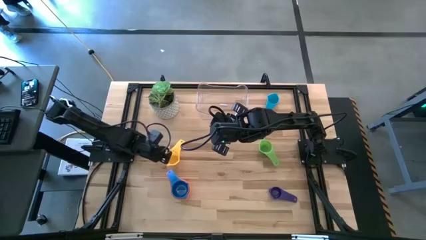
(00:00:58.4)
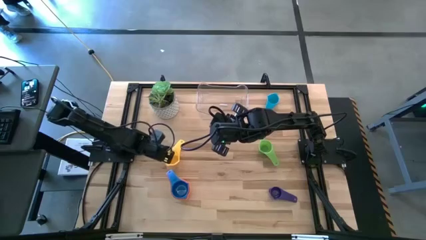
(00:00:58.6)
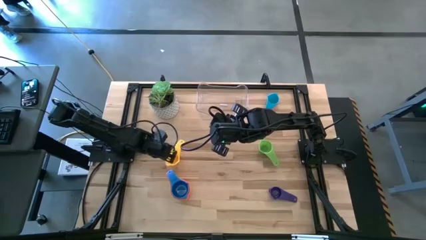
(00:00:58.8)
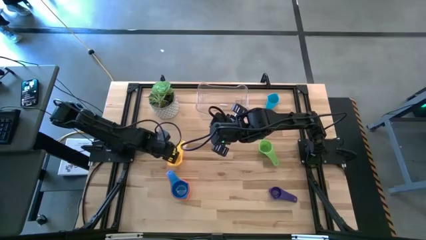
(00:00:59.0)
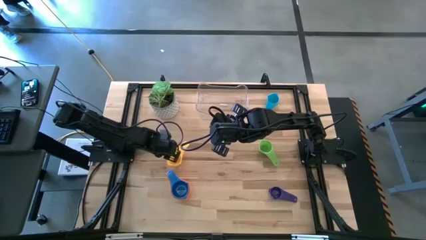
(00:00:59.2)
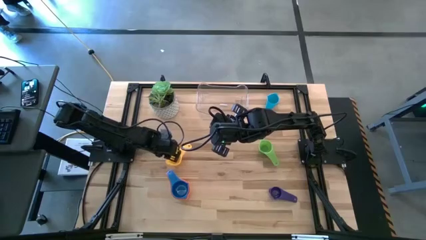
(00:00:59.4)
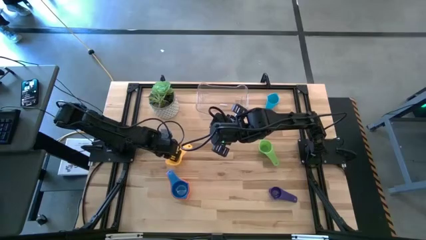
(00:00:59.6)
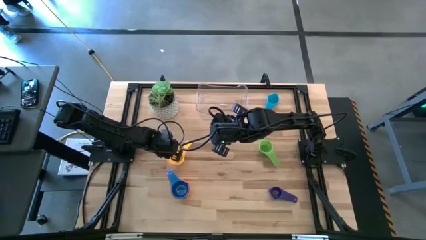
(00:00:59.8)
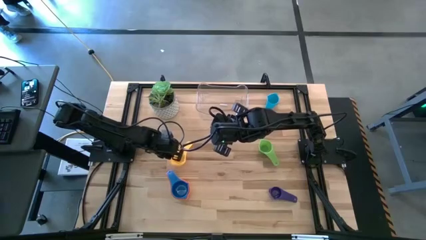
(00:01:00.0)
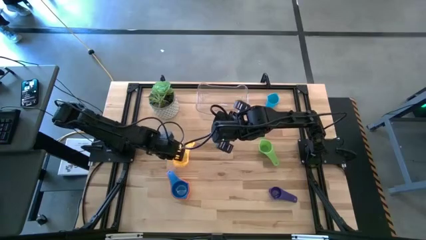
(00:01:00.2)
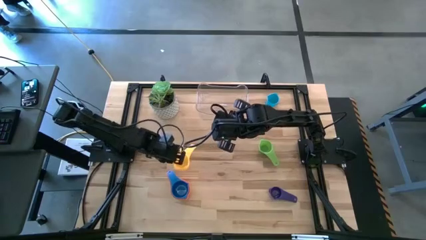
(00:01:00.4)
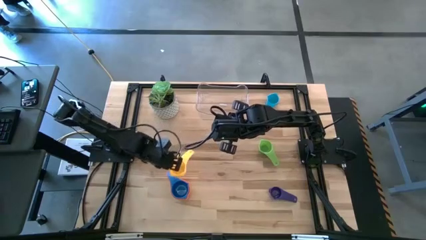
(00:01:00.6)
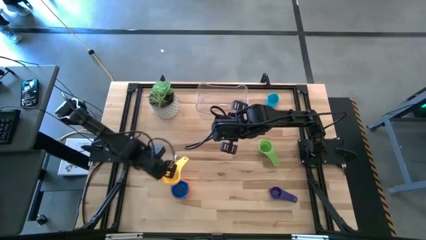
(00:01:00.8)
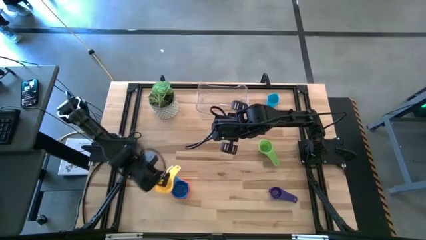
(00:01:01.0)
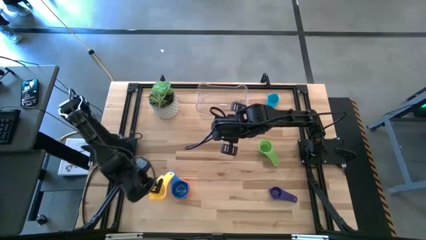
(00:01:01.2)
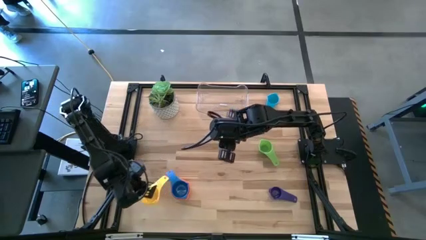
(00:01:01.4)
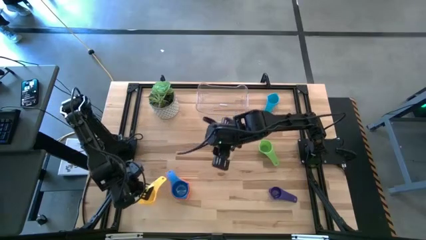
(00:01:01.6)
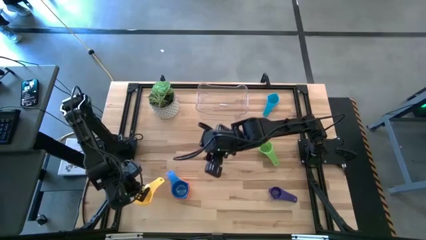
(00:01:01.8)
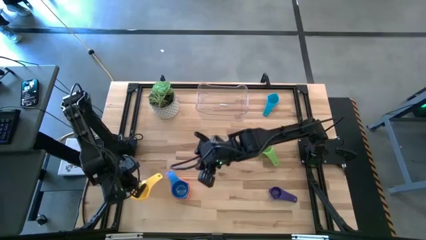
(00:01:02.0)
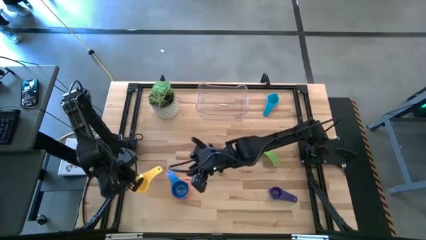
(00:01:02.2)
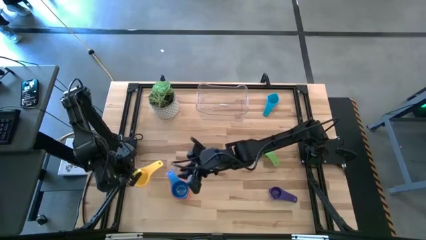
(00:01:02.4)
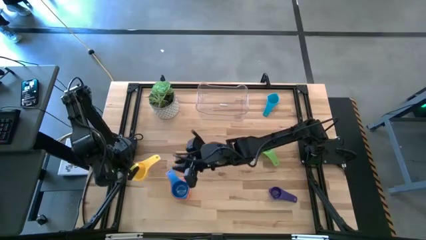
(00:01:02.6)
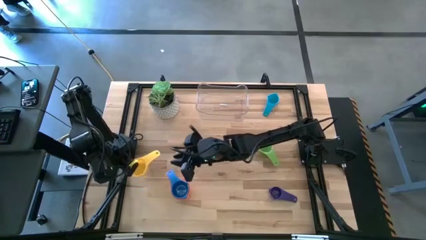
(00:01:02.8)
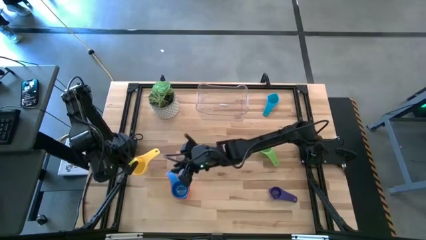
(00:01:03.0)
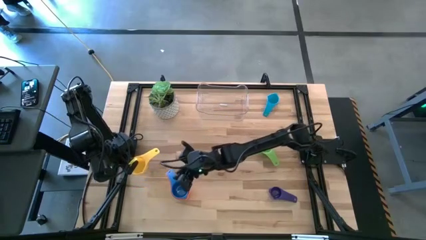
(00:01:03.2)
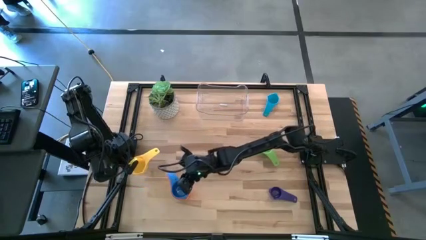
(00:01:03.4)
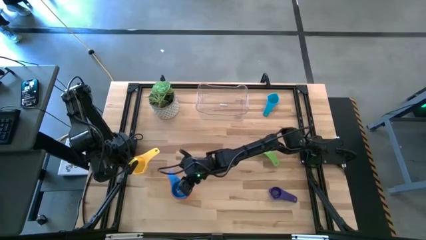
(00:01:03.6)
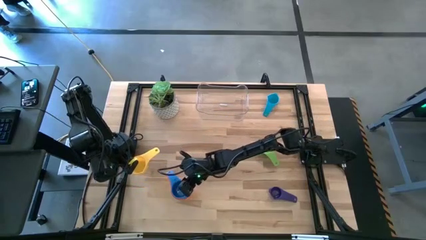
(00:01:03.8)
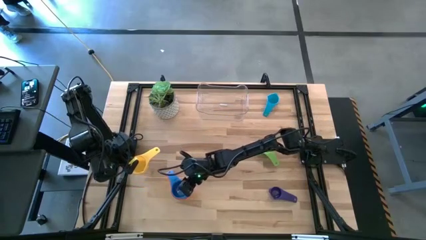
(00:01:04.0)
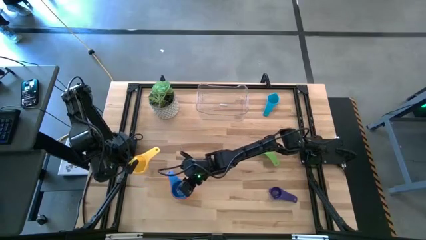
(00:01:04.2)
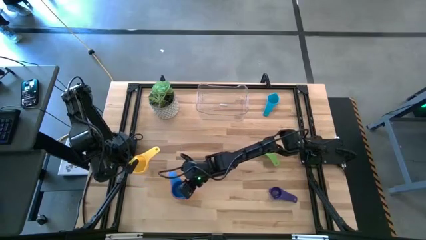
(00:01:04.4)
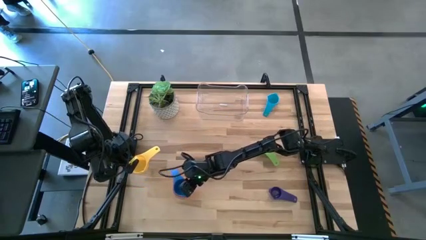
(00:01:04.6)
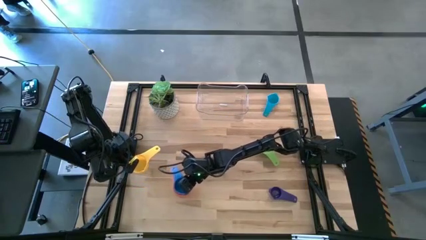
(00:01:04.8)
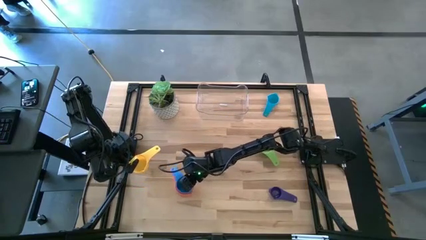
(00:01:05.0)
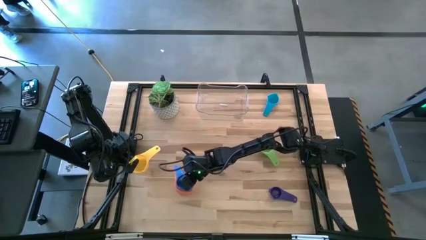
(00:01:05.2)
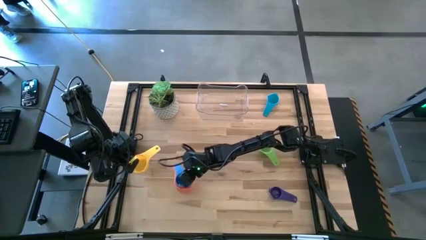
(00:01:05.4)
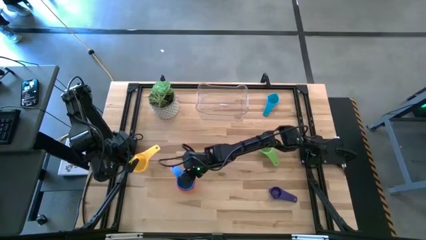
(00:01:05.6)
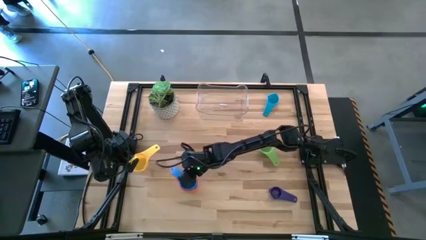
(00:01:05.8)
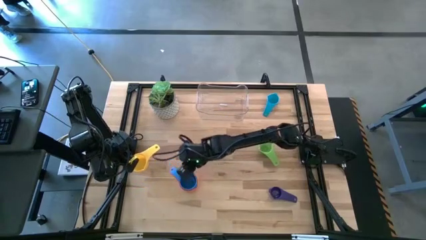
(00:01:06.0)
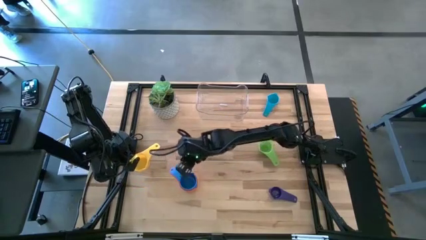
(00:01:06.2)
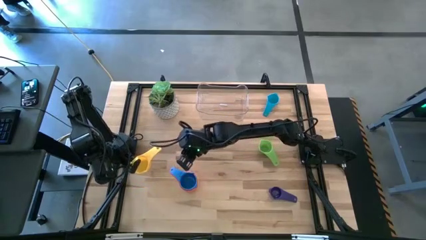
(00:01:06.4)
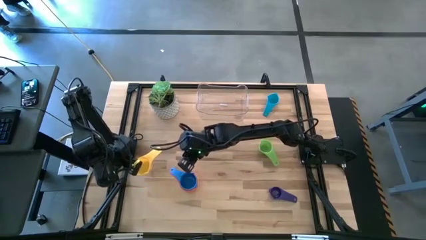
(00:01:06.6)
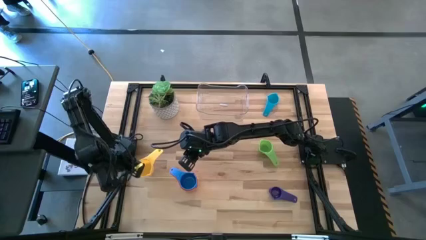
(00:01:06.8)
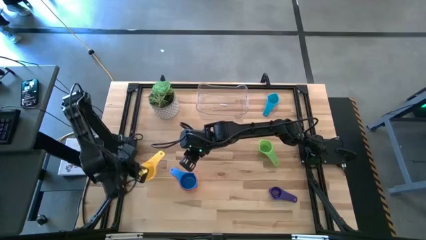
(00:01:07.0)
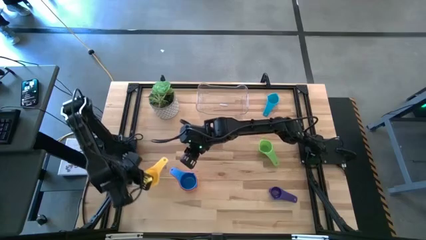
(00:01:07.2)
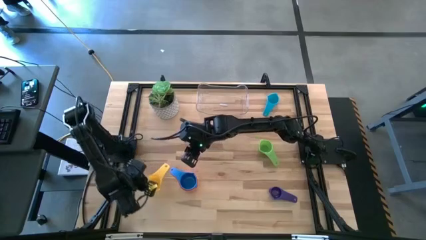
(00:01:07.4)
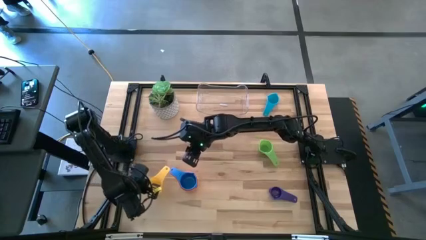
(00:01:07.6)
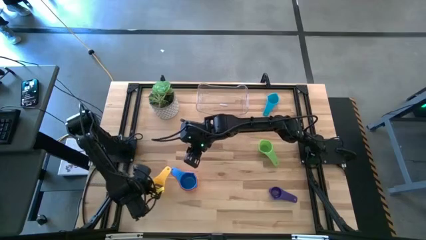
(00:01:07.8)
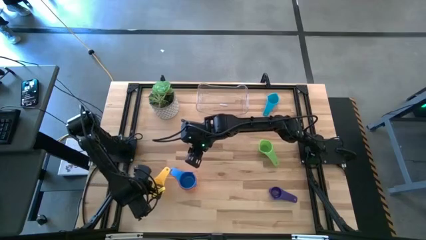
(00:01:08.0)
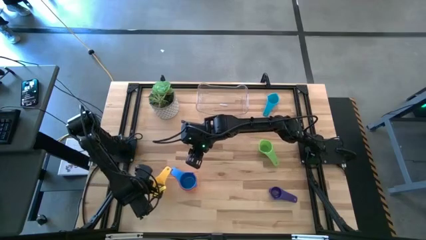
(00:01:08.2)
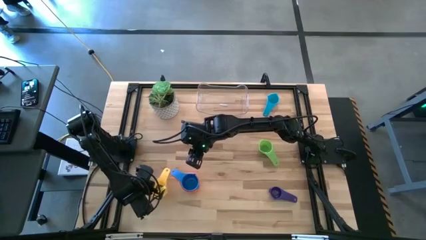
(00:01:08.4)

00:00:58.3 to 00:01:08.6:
Task: Nest measuring cups in basket
Stack the yellow measuring cup on top of the blue measuring cup

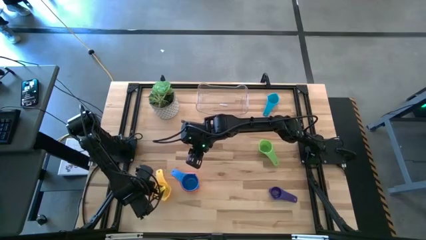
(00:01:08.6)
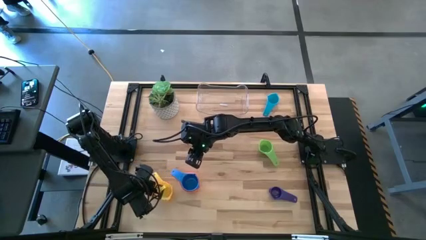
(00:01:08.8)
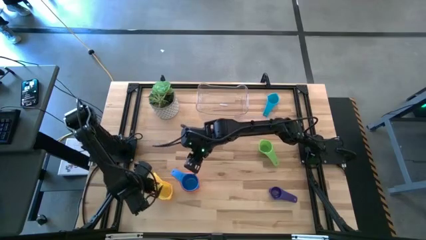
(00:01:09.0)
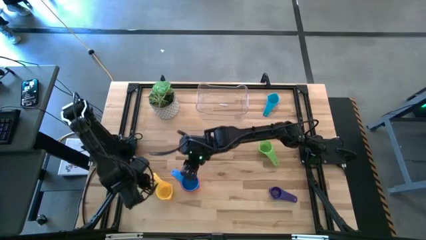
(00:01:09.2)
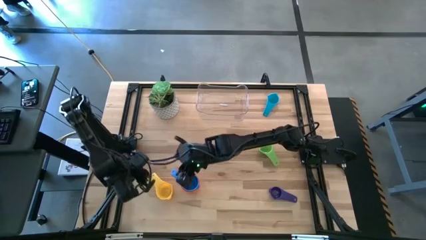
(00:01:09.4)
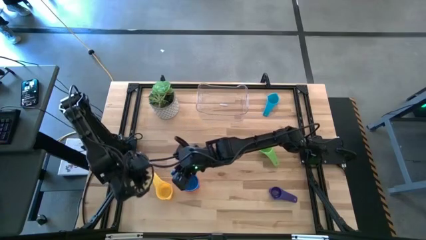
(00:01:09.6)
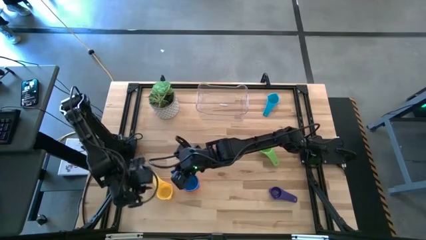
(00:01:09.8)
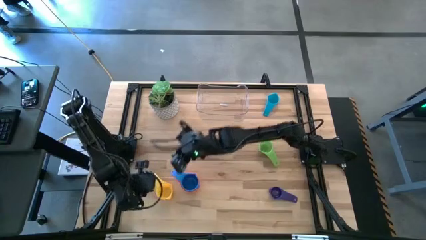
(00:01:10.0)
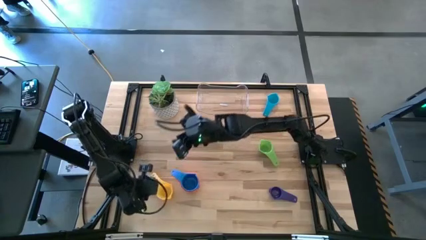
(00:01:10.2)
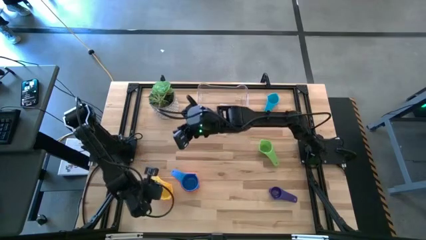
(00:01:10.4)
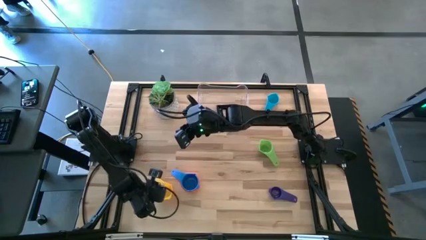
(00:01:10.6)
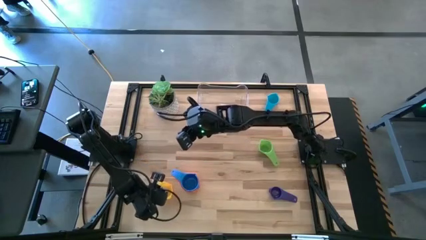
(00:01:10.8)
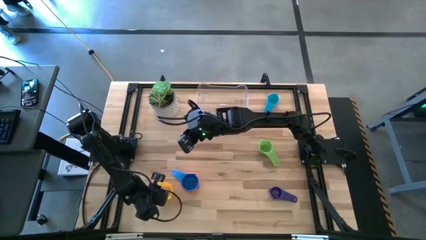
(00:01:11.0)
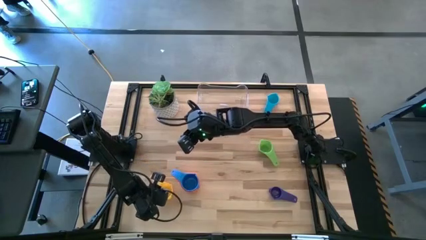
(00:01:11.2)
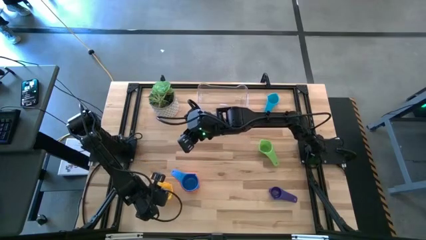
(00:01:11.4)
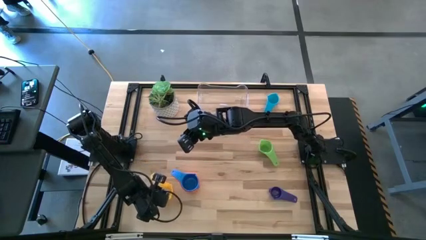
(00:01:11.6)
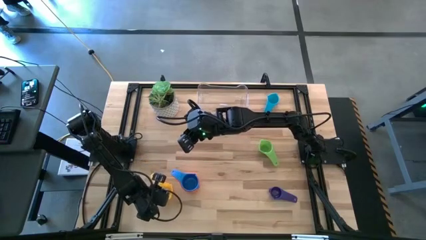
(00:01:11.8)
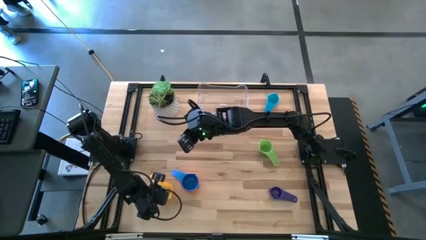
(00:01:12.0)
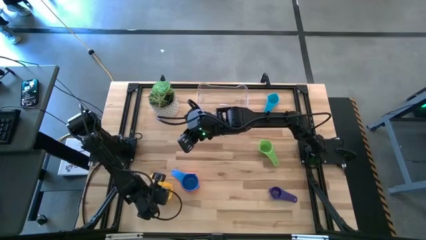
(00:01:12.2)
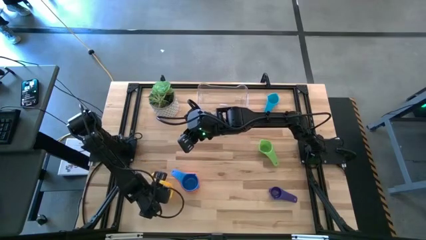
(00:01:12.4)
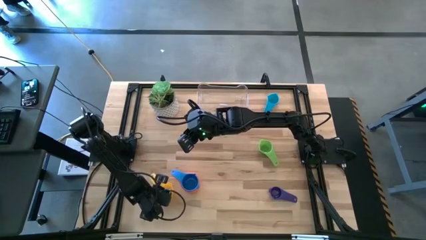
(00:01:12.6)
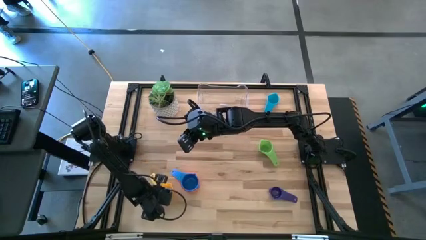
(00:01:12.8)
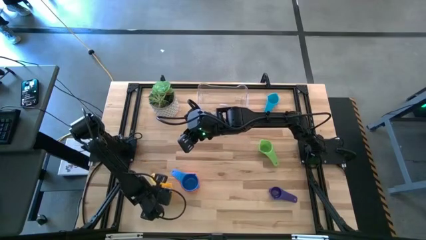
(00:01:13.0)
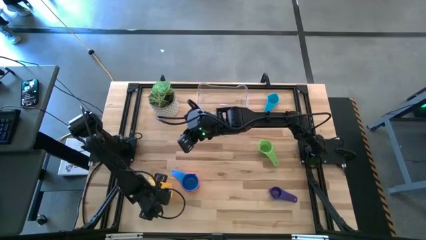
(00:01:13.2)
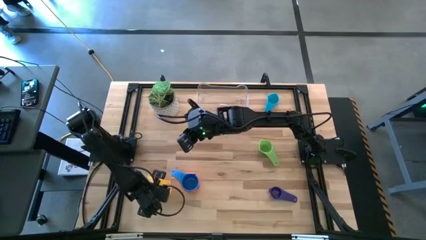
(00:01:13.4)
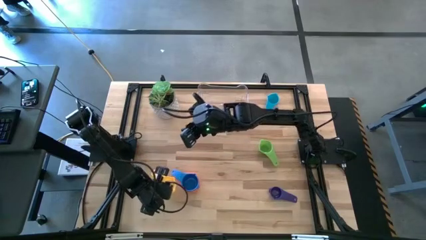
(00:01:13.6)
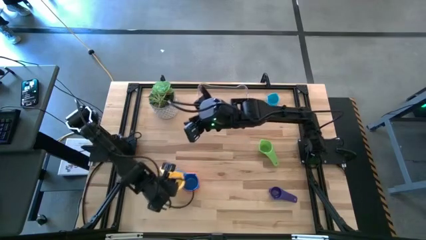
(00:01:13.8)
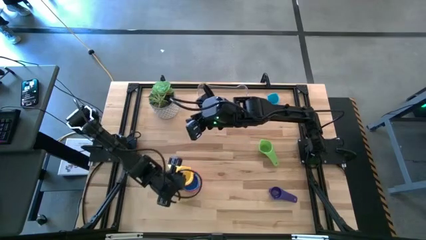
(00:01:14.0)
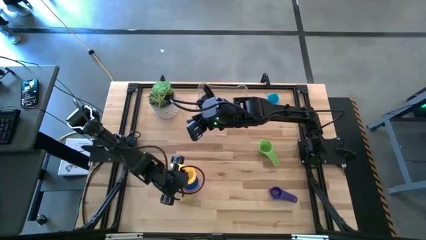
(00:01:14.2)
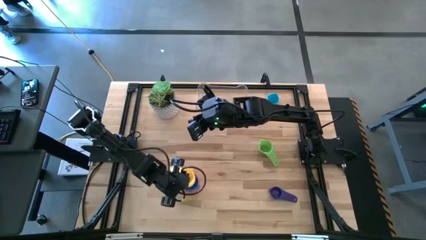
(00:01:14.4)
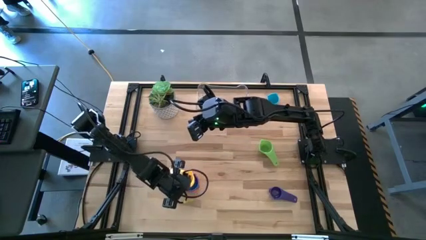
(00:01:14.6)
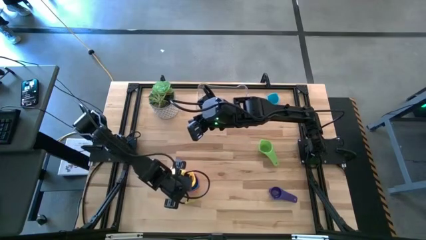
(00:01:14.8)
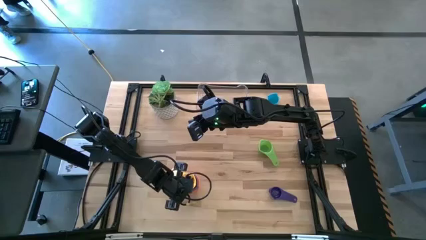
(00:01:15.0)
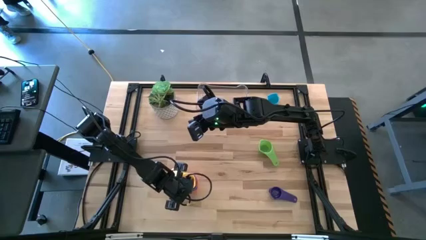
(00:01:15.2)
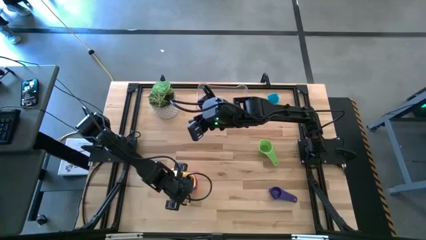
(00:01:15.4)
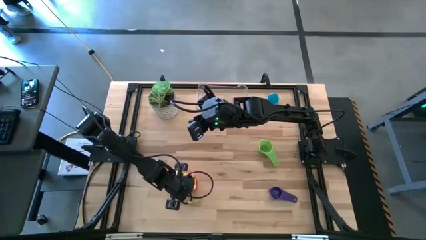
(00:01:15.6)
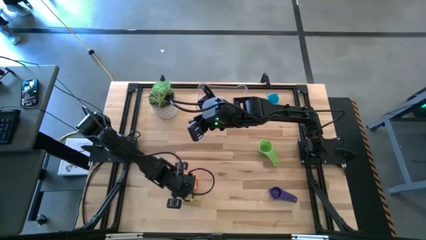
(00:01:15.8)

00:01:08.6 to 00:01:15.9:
Stack the yellow measuring cup on top of the blue measuring cup
